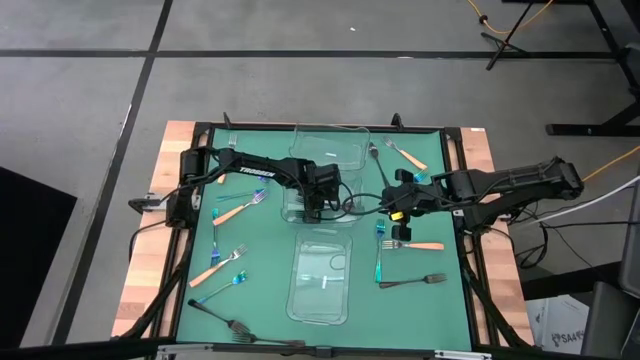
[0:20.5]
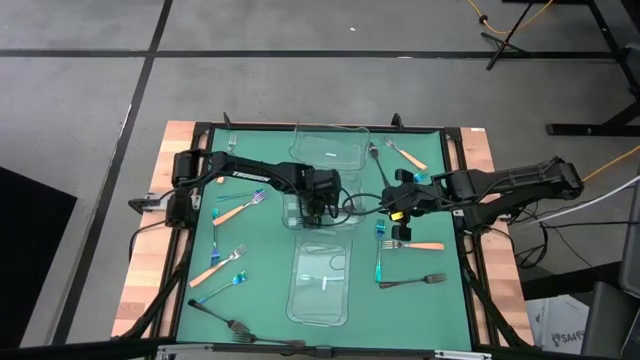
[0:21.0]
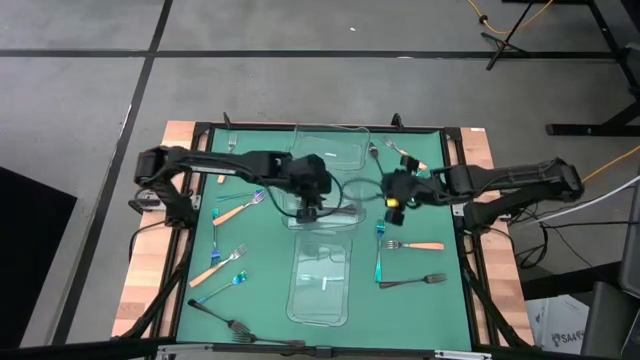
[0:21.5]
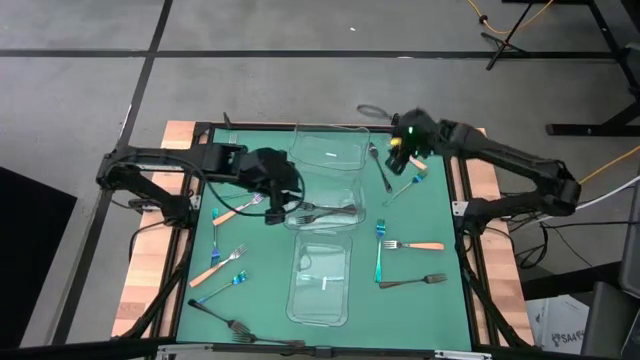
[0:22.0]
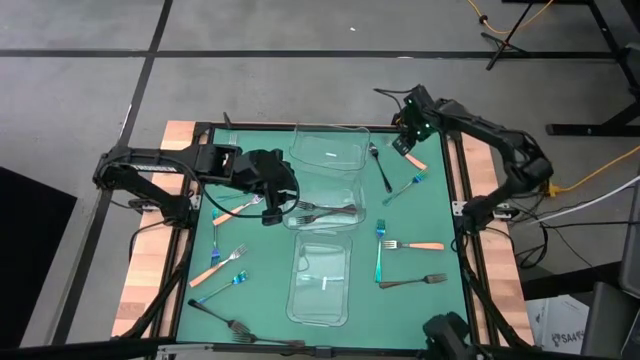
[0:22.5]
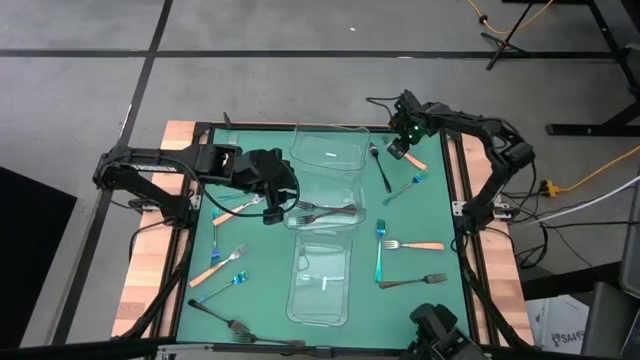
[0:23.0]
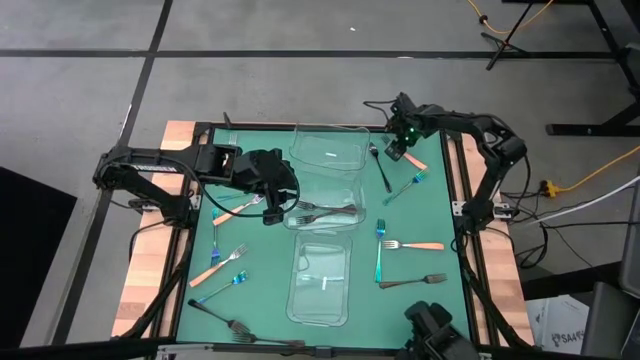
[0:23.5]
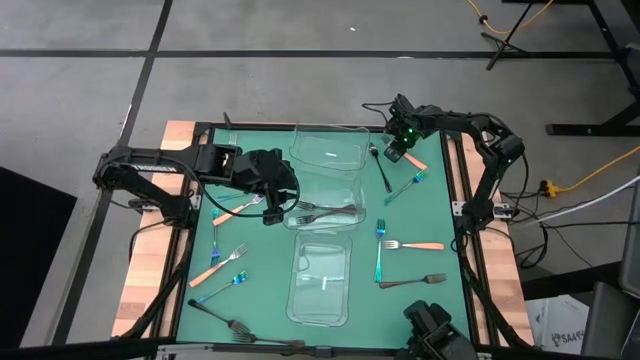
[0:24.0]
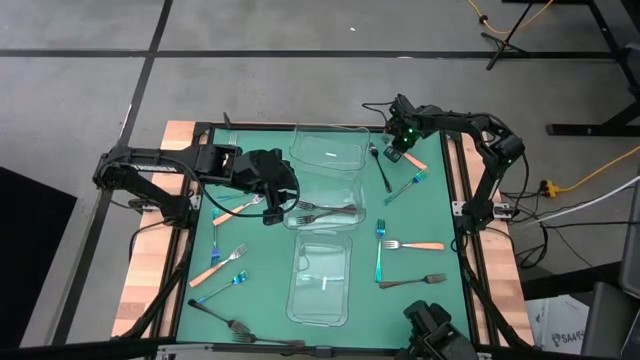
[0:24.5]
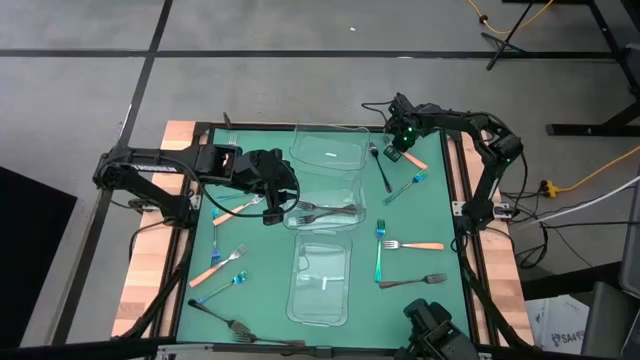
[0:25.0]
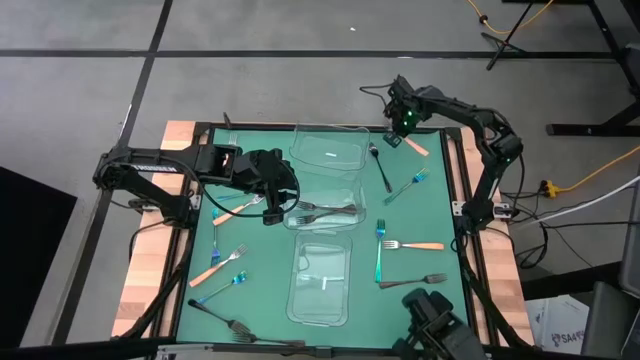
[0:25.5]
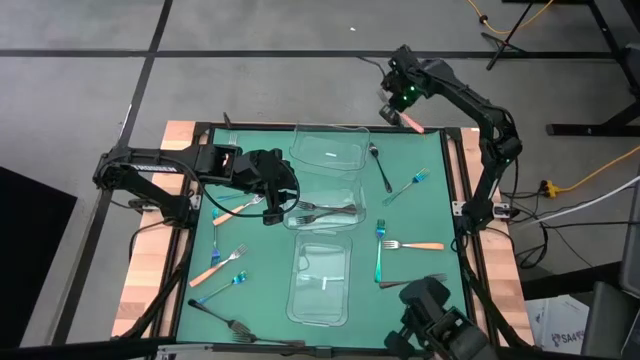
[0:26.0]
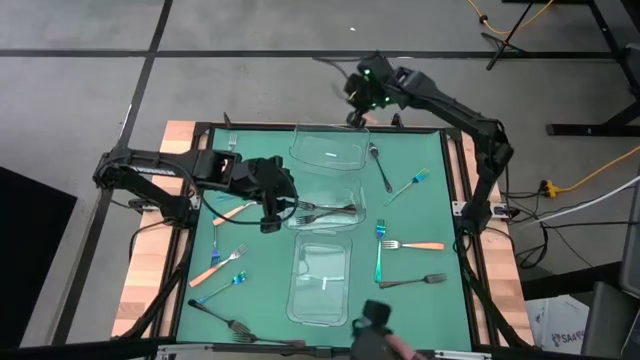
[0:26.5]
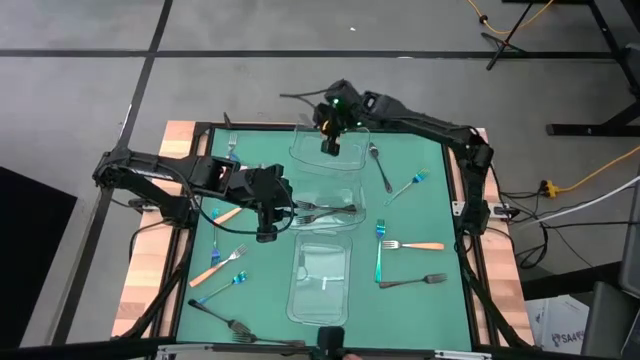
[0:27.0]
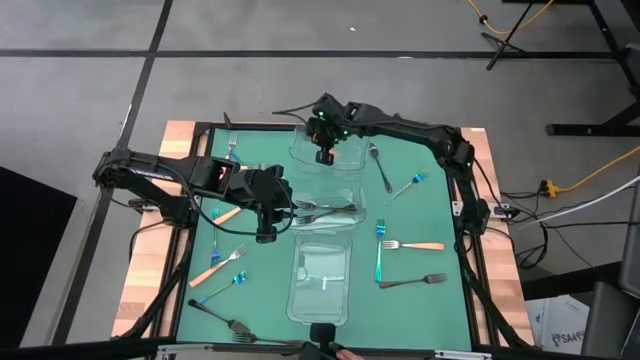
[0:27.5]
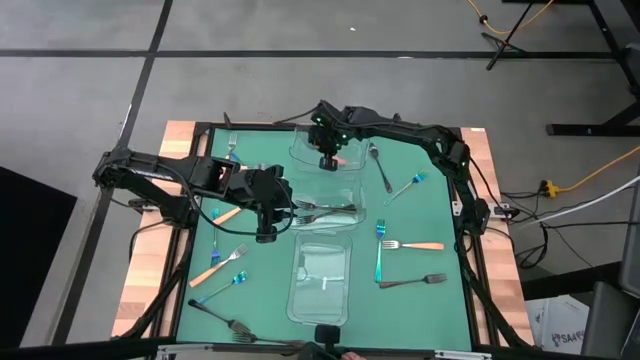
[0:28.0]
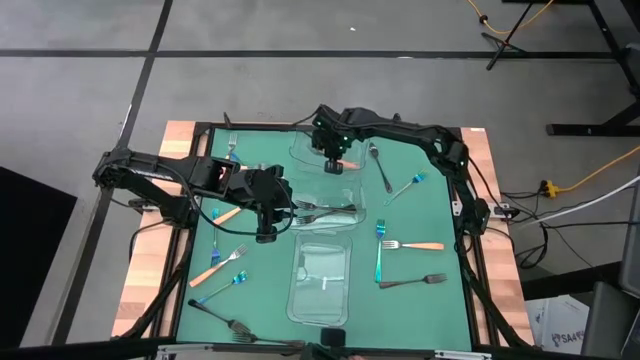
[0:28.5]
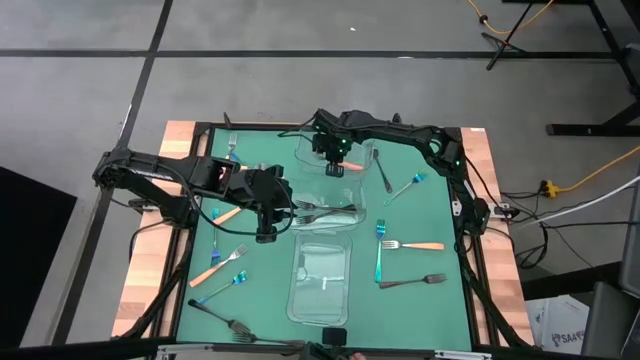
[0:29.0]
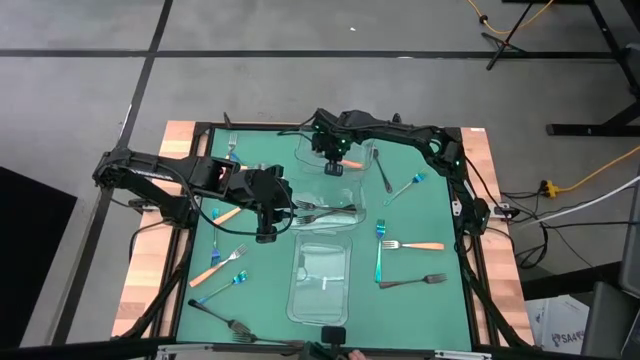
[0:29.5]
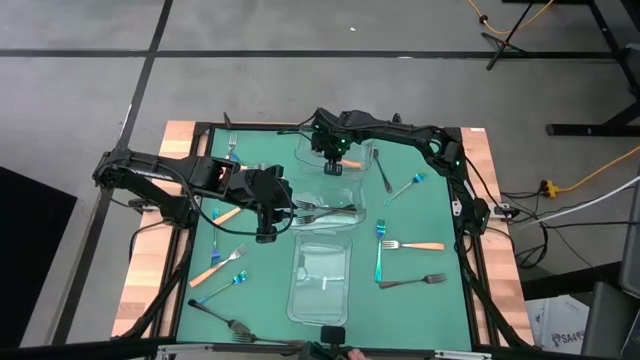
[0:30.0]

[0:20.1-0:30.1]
Task: Sort silverware by color (type)
Put the yellow fork into the top transparent bin

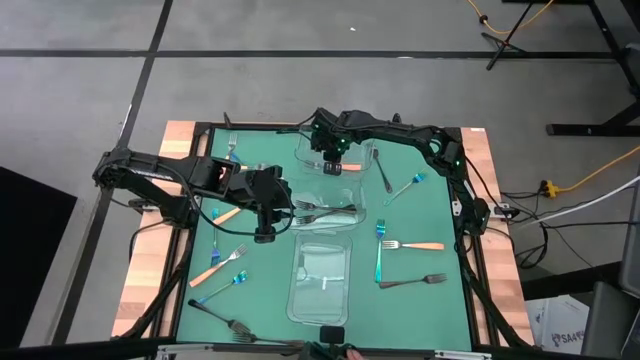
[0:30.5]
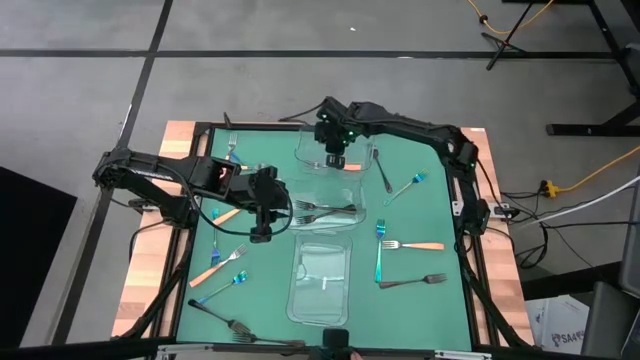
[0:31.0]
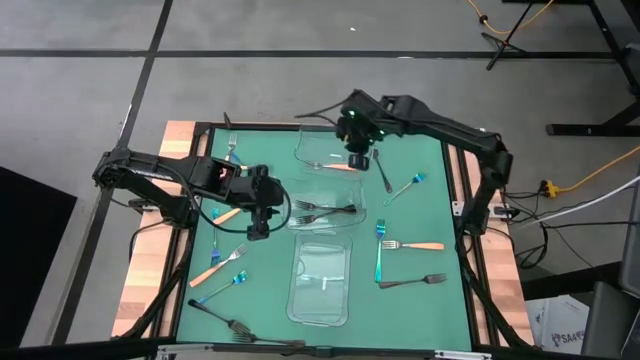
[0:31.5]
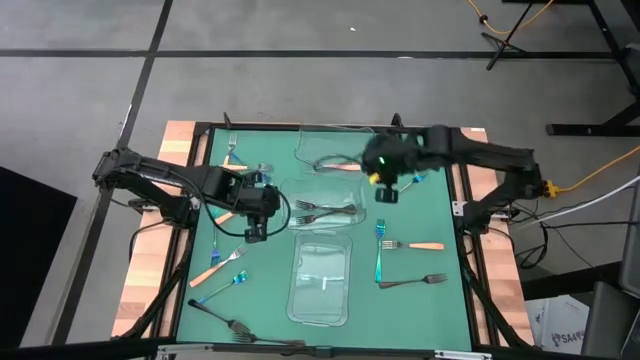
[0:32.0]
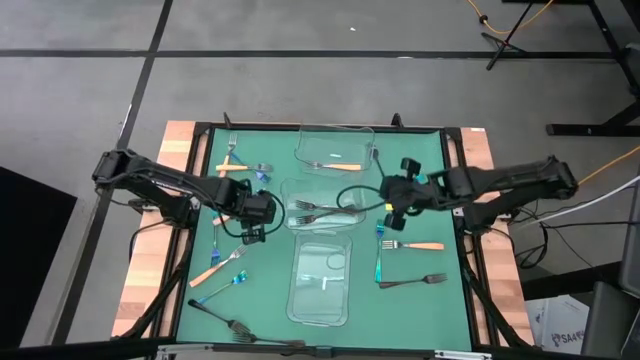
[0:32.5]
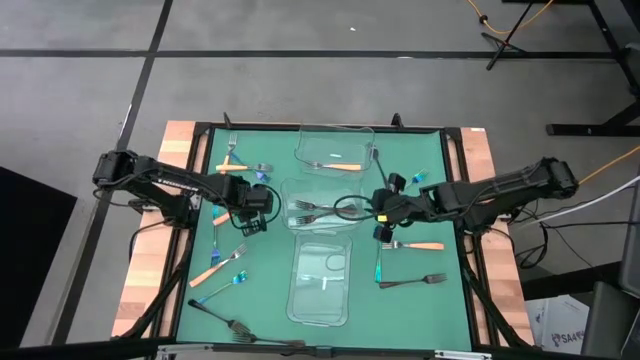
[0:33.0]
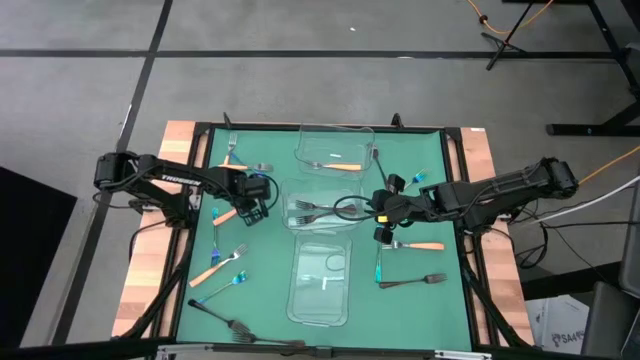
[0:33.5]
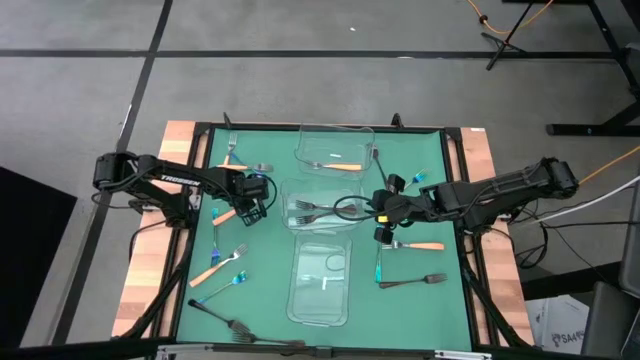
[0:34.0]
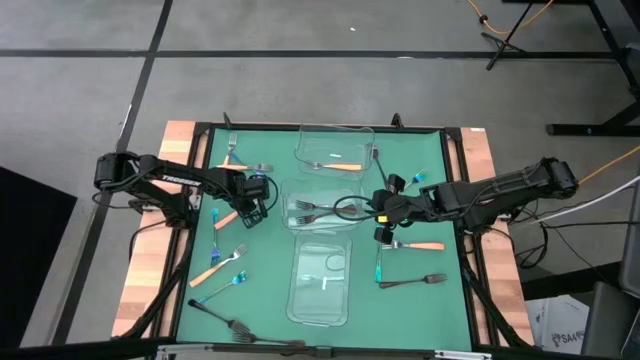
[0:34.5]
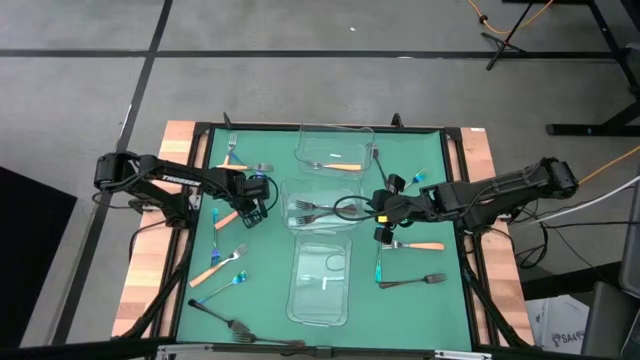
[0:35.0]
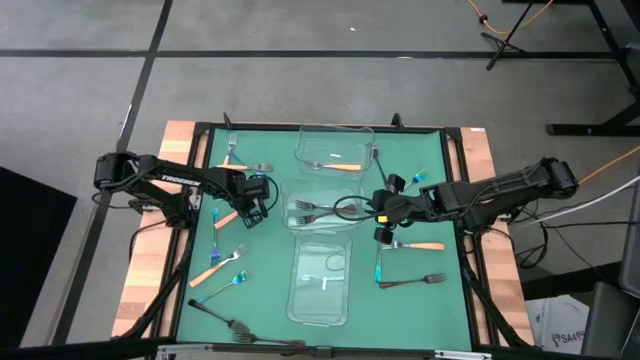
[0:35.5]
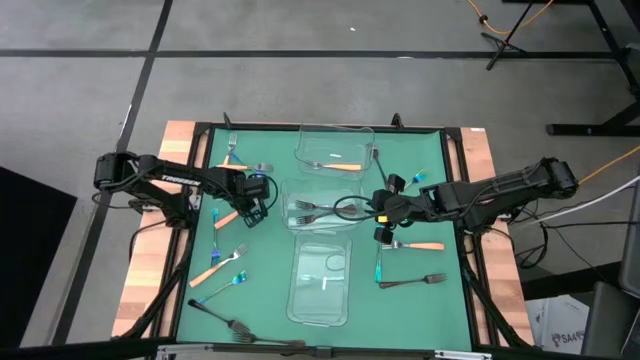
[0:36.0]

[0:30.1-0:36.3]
Put the yellow fork into the top transparent bin

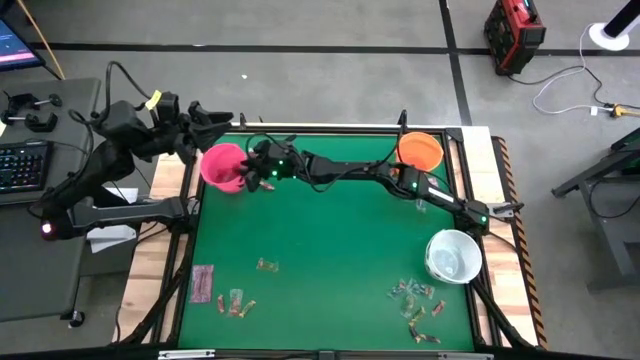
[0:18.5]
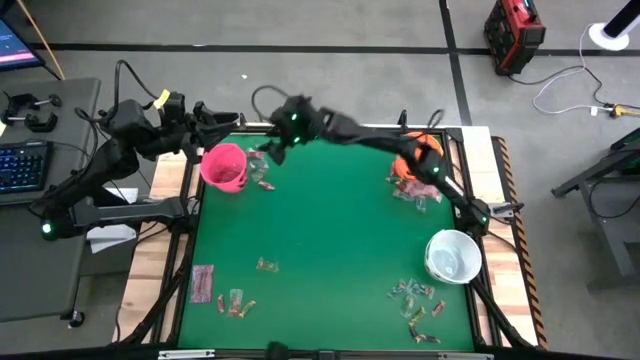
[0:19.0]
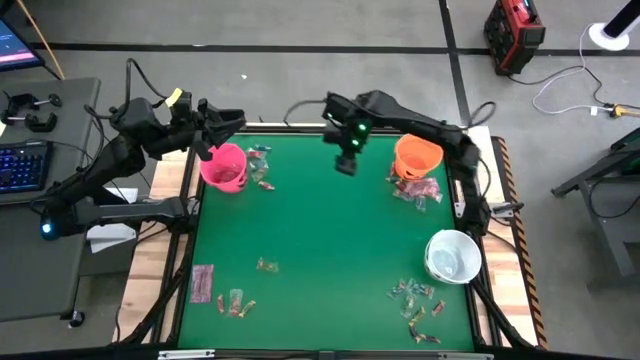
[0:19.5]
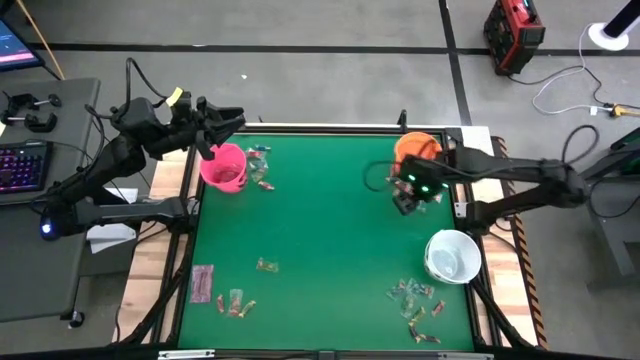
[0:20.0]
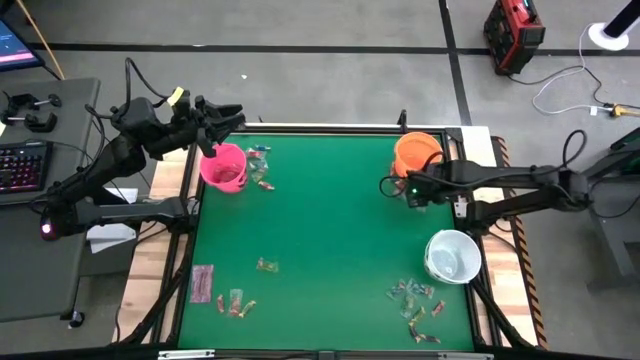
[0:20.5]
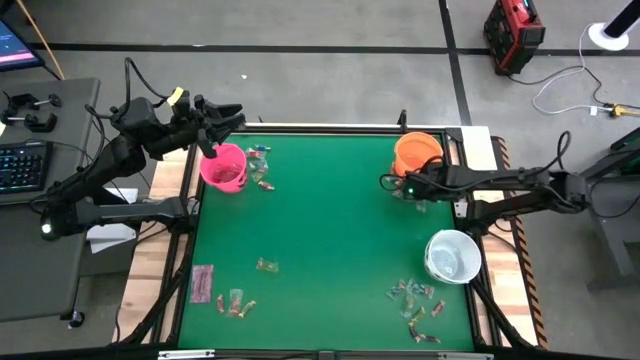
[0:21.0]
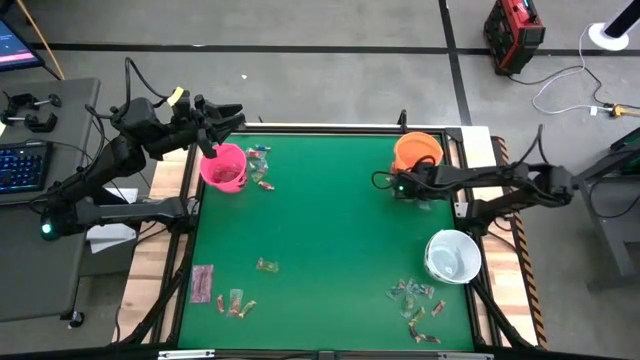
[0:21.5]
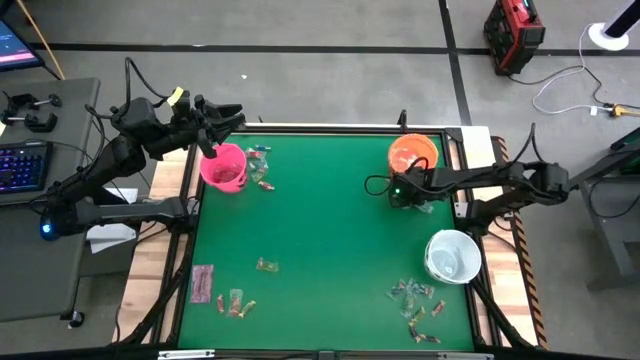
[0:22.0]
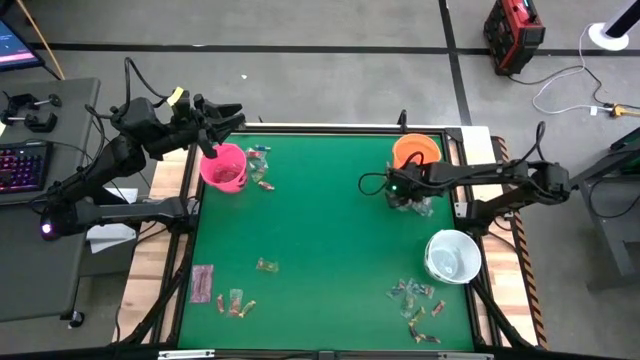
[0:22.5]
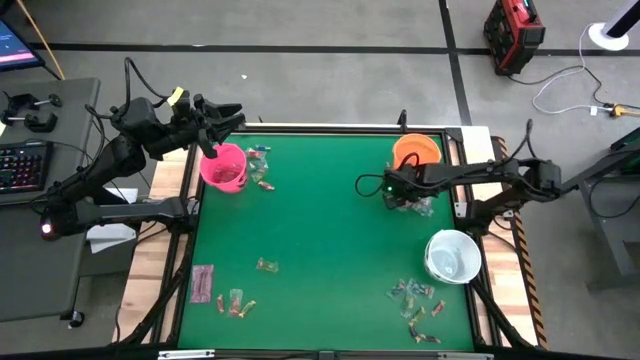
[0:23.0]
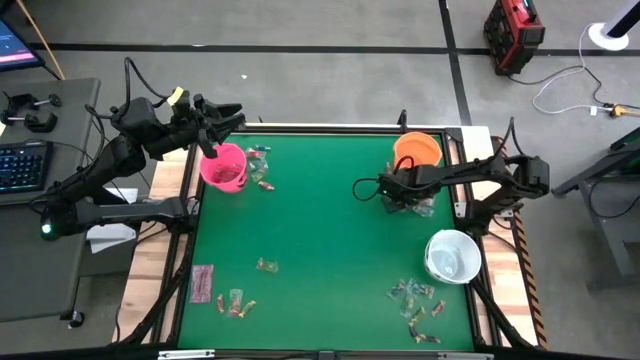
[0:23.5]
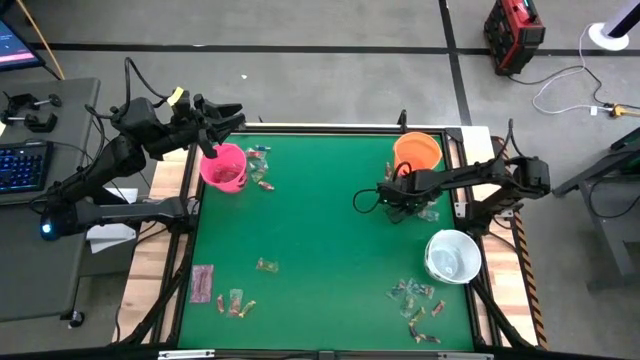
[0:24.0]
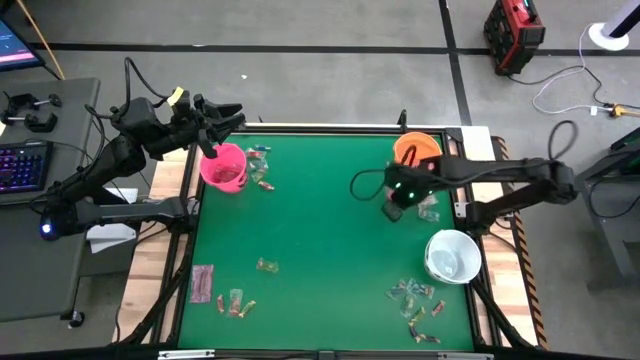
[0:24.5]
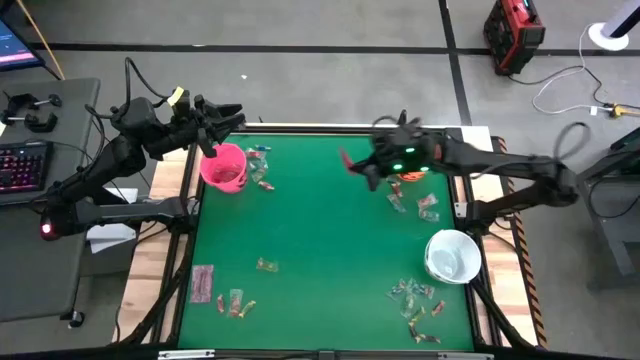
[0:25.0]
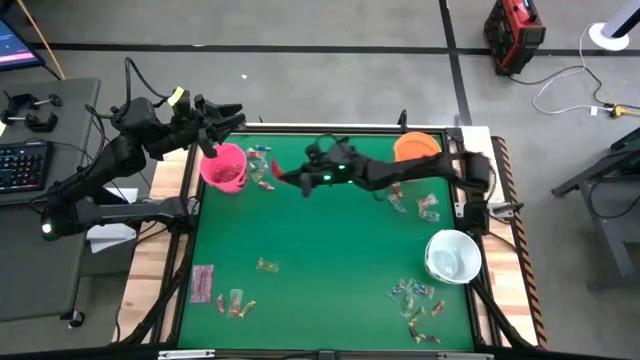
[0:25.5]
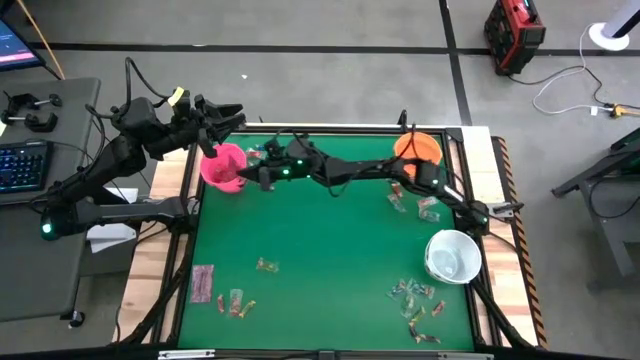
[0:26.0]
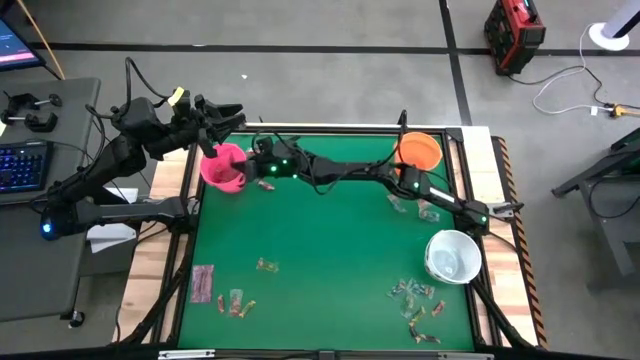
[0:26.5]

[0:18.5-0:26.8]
Task: Sort candy by brand, put in halloween buckets
Put the red candy into the pink bucket
